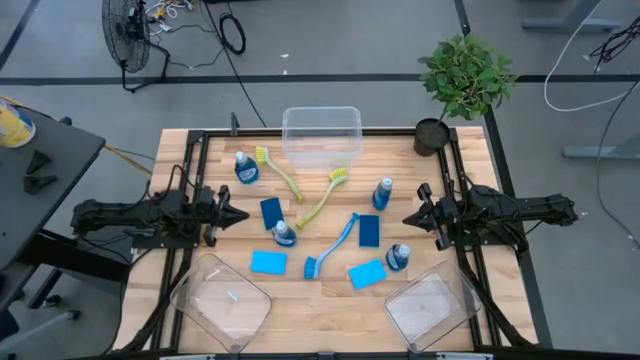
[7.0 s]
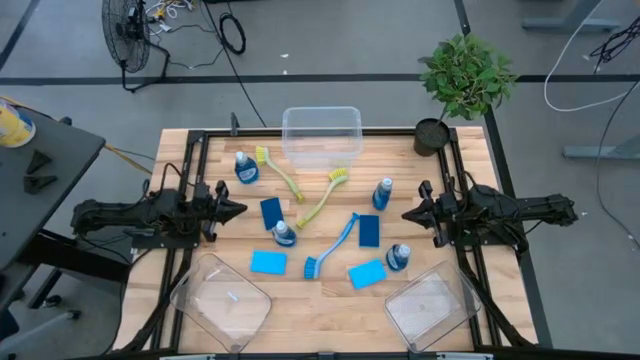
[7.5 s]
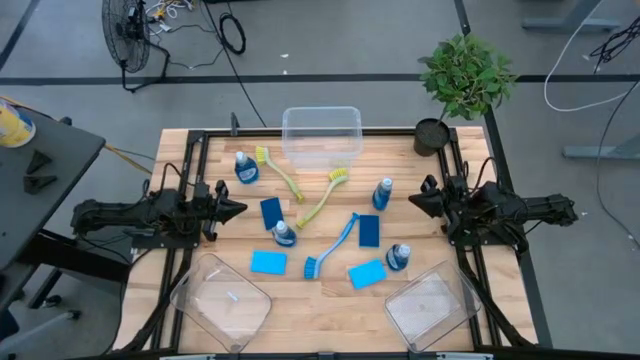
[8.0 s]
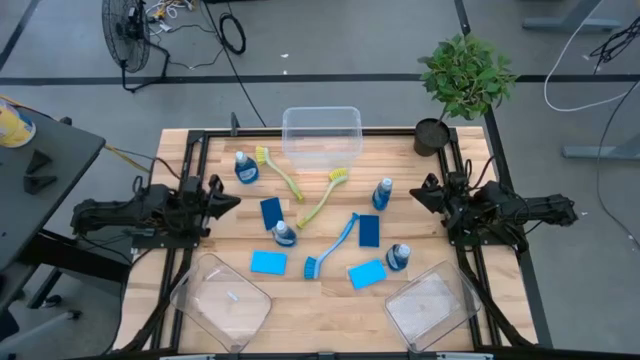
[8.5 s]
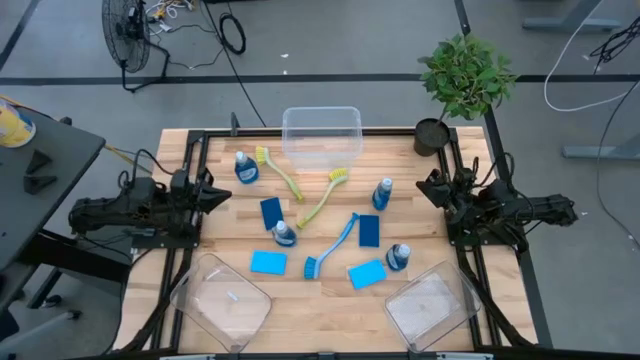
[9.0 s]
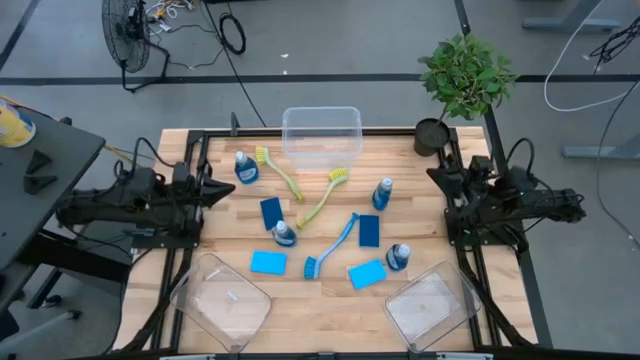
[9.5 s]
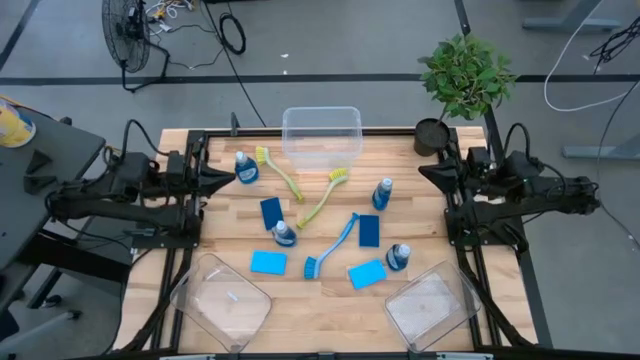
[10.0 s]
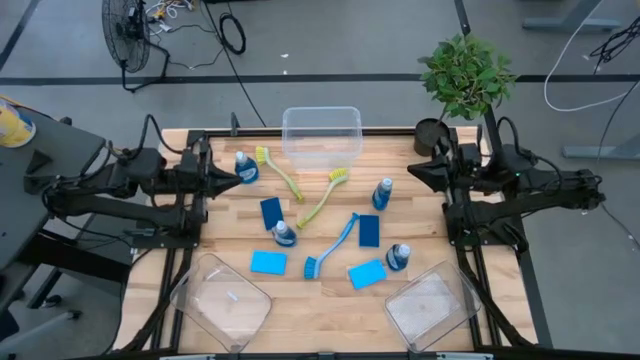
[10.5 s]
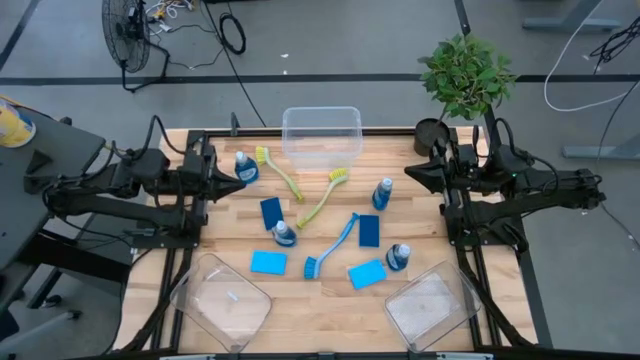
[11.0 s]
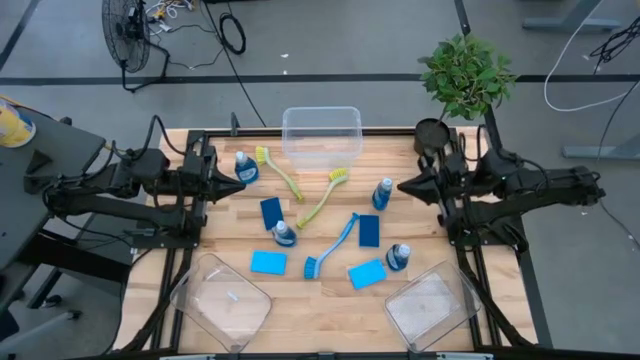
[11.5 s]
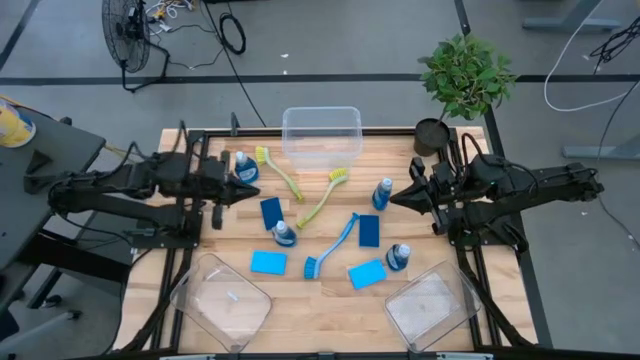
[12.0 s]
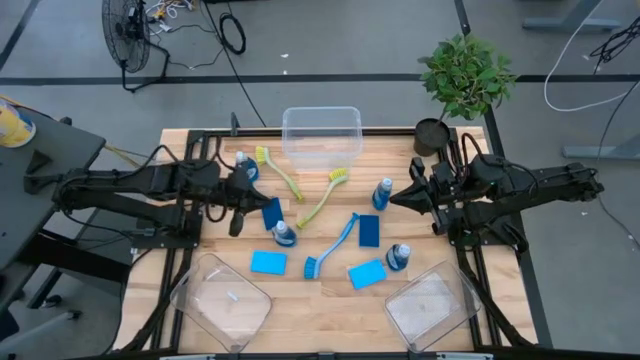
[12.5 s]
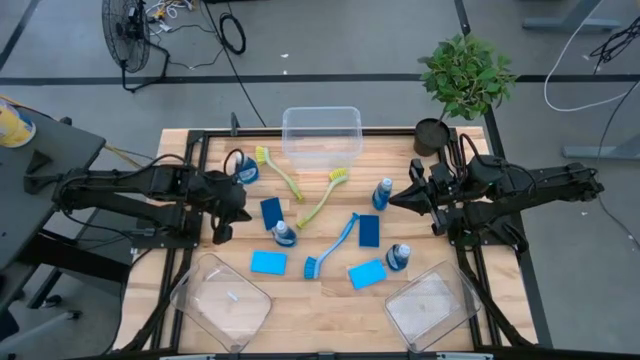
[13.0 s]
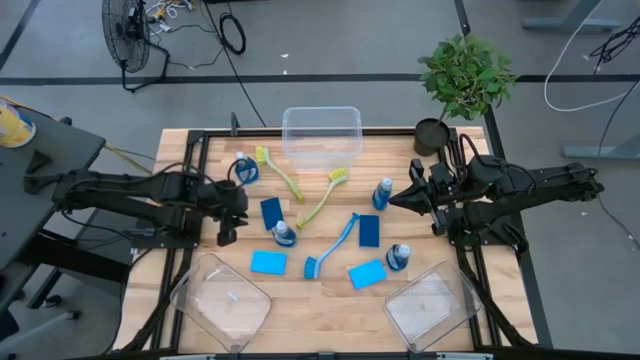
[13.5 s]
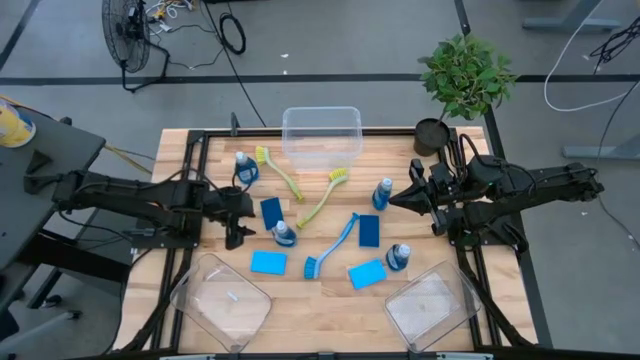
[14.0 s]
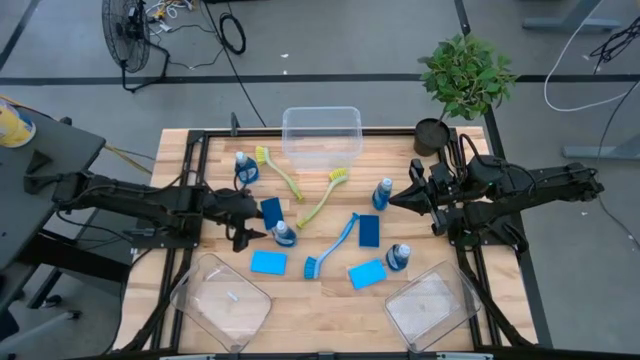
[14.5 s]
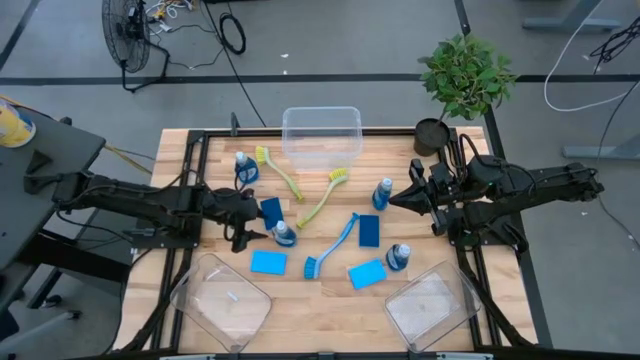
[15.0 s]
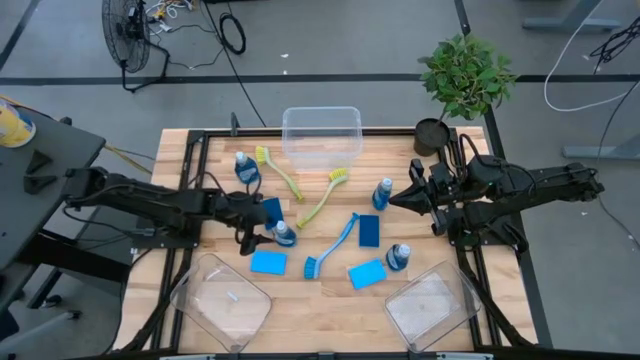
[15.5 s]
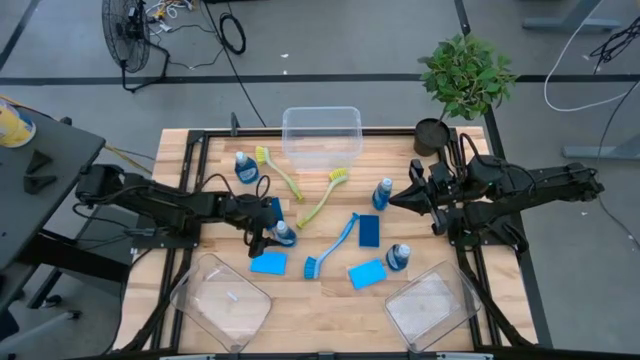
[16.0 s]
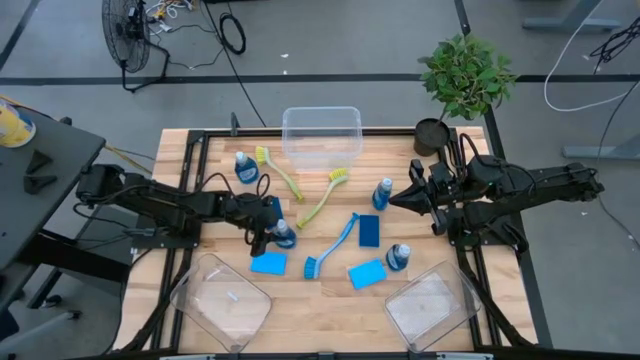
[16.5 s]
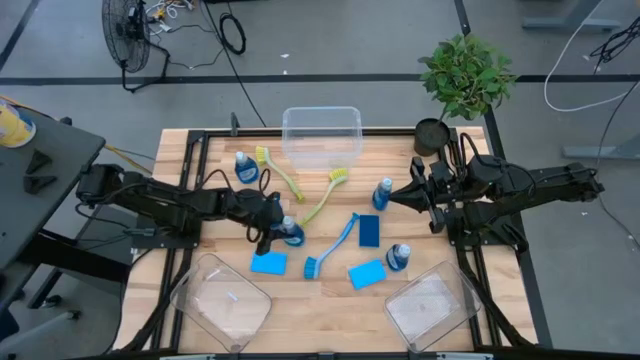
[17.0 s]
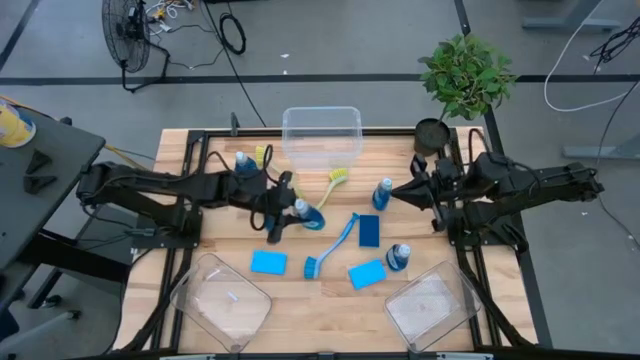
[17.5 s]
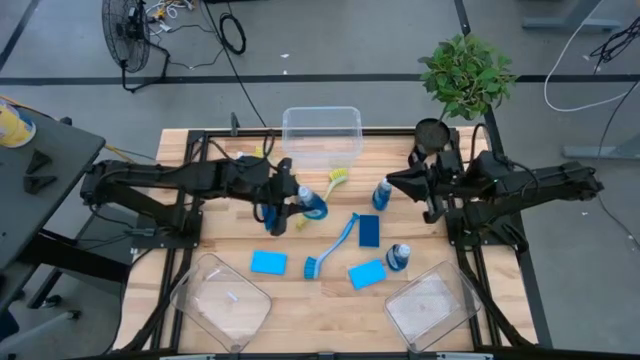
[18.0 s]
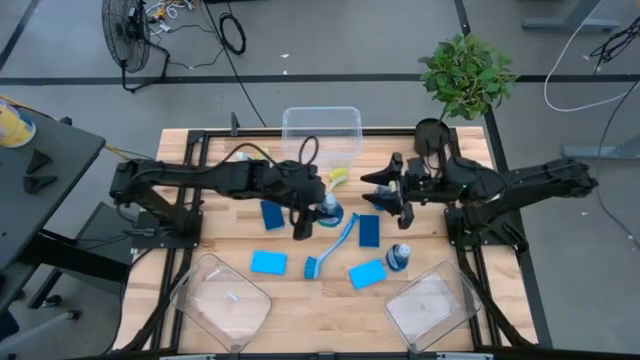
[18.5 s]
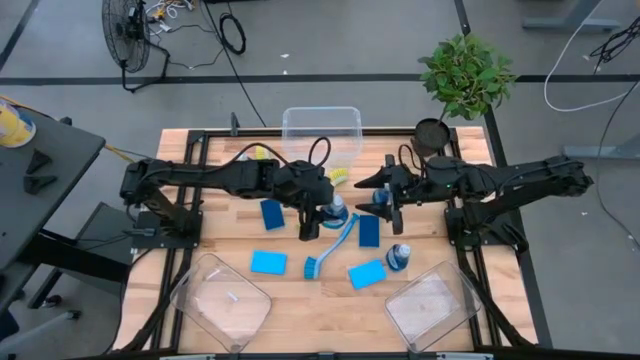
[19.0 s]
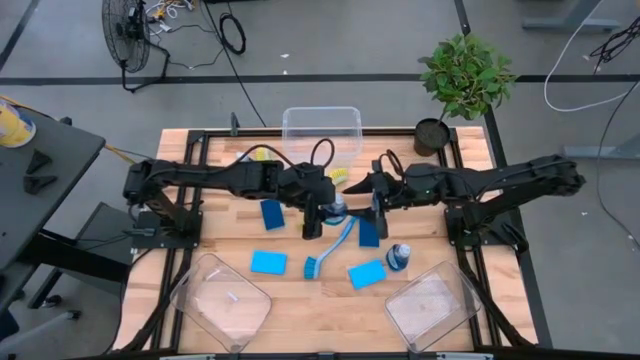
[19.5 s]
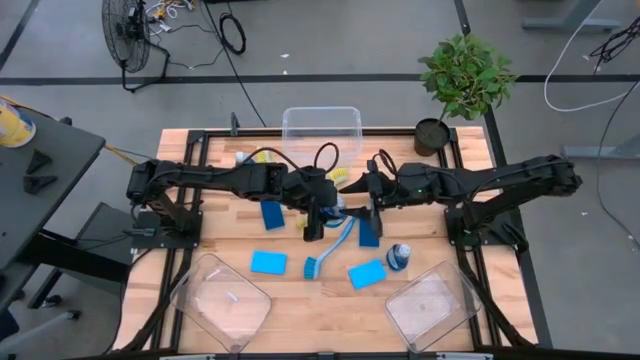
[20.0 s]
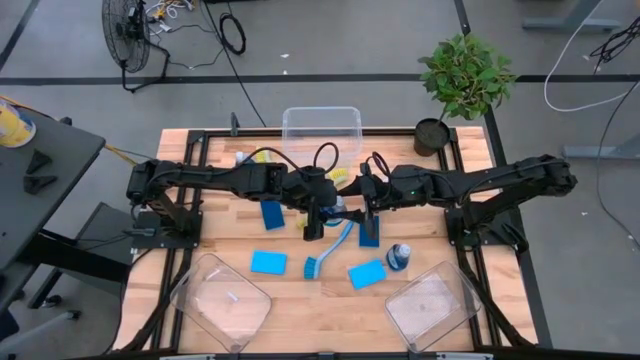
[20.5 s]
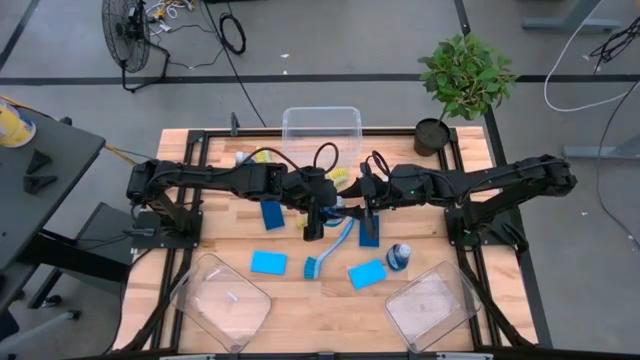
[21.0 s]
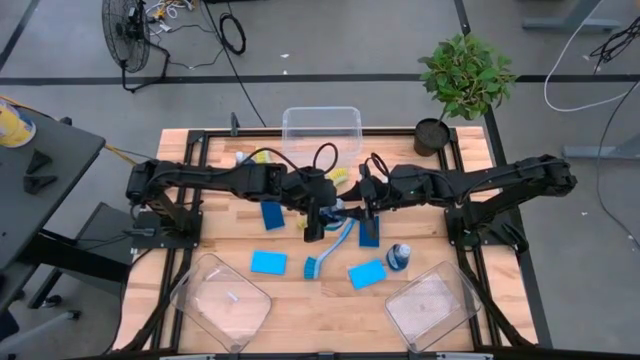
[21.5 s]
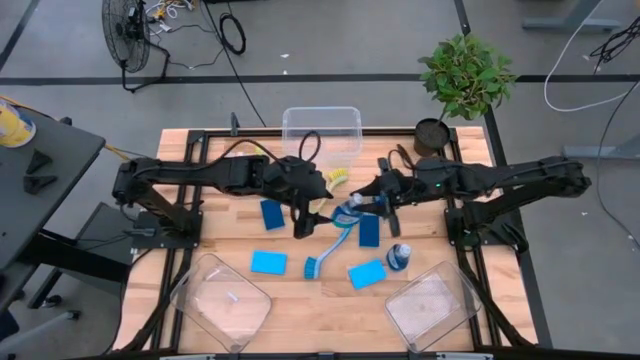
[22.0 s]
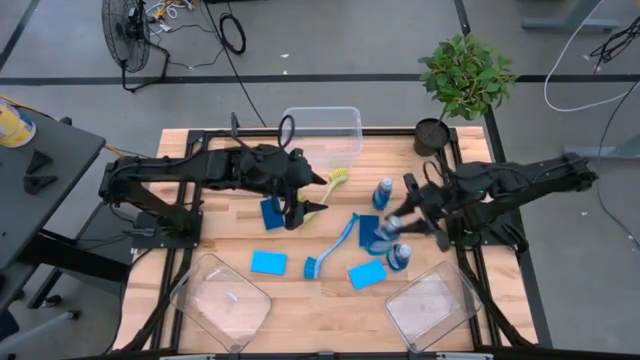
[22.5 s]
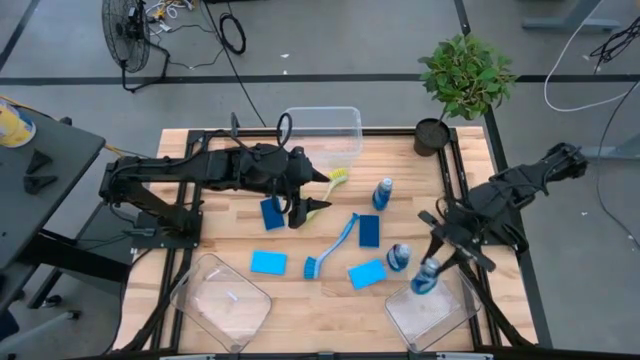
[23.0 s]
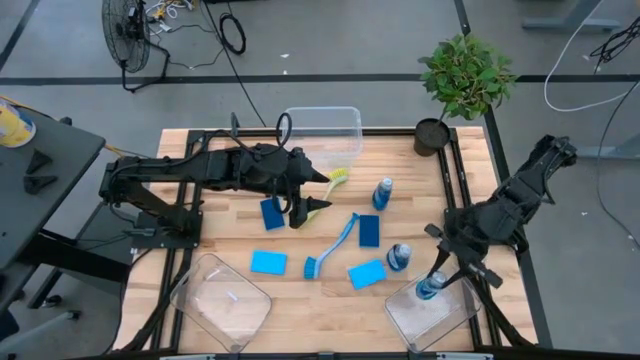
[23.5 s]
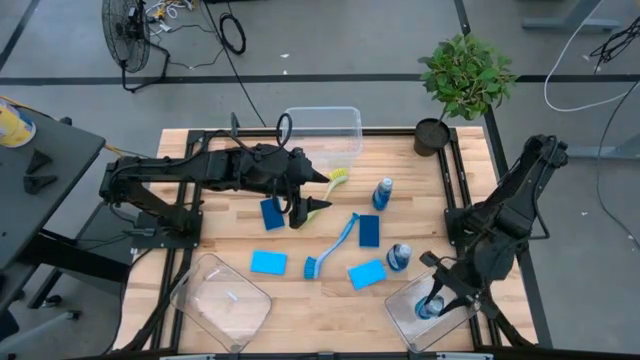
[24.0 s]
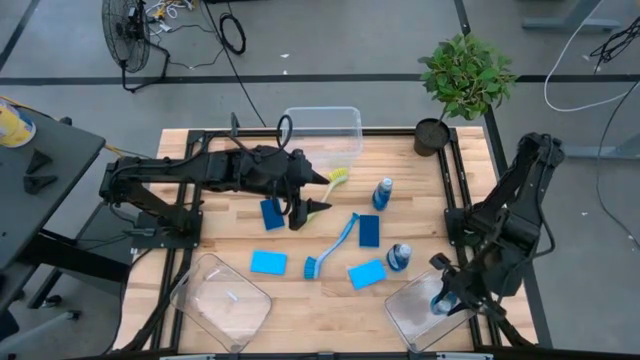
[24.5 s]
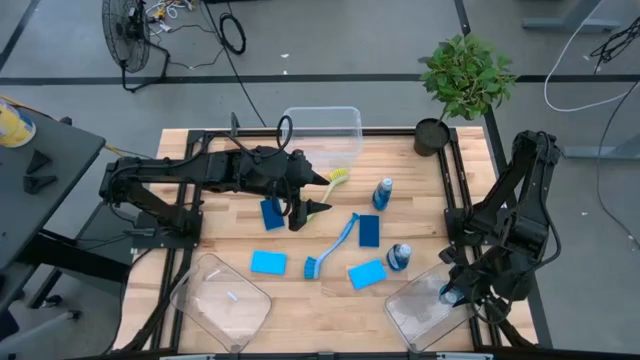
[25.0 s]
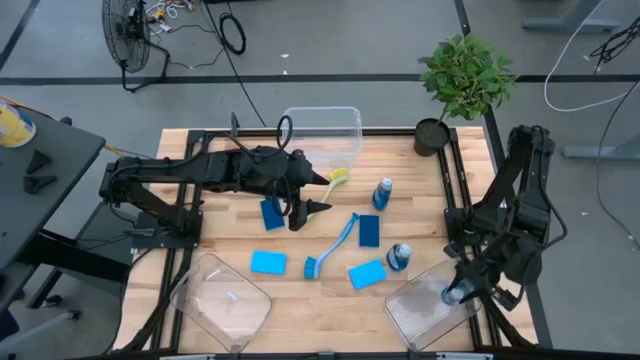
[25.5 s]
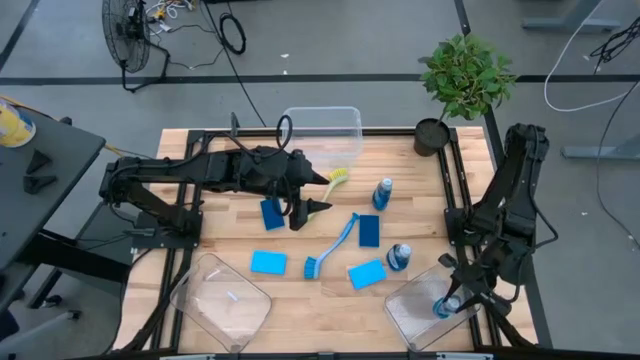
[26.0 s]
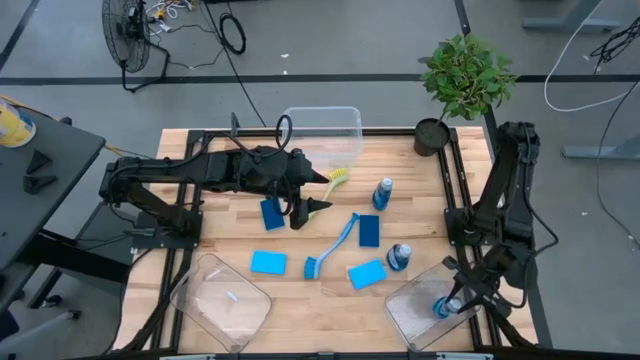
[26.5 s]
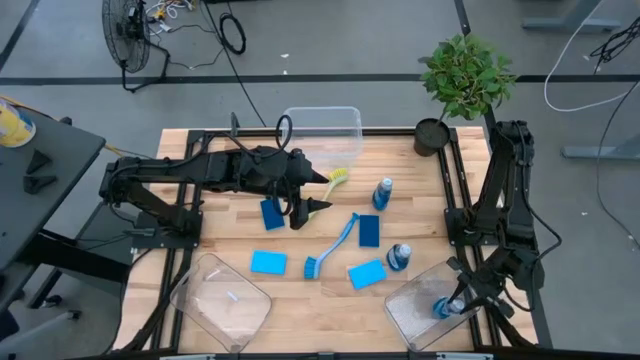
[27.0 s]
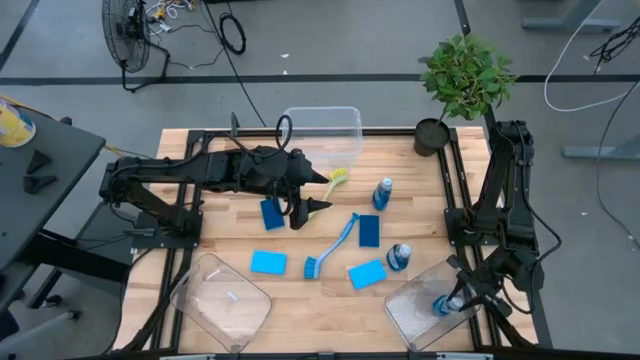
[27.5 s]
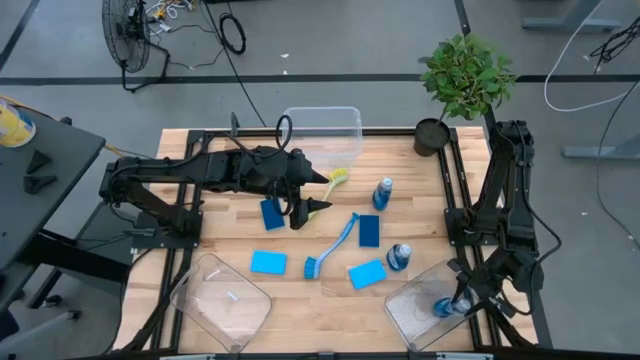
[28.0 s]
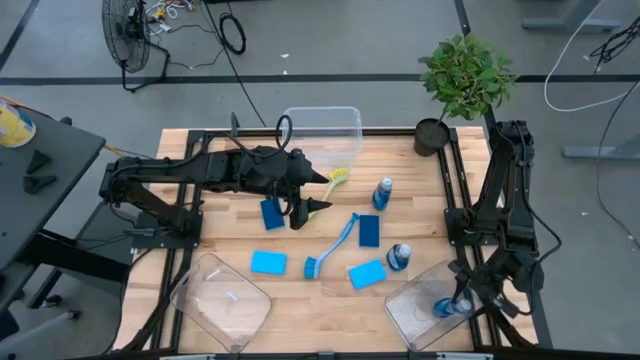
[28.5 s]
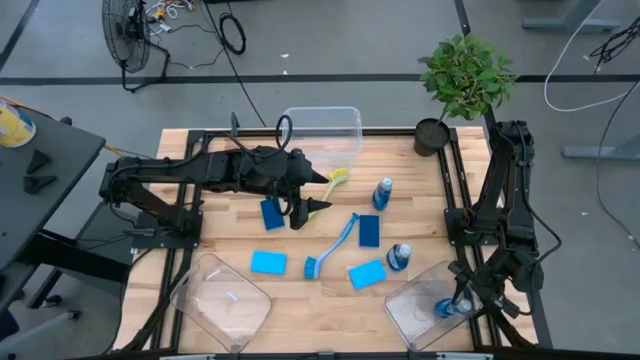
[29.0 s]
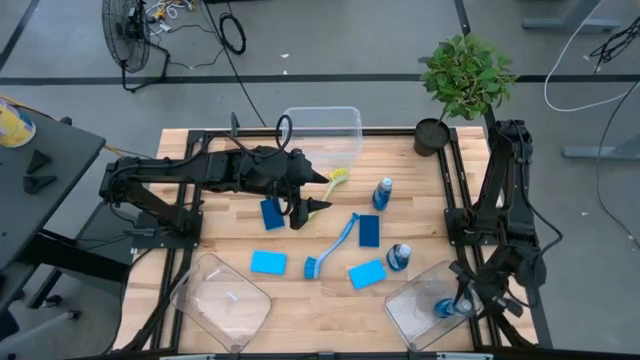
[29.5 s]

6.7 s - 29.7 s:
Task: Pick & Place Kitchen Sink Supplies
Put the blue dishwashing liquid into the bottom right transparent bin
